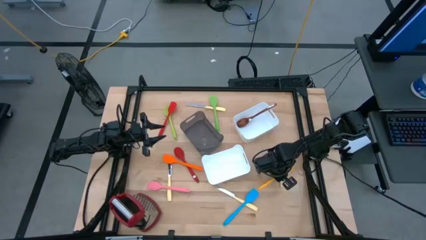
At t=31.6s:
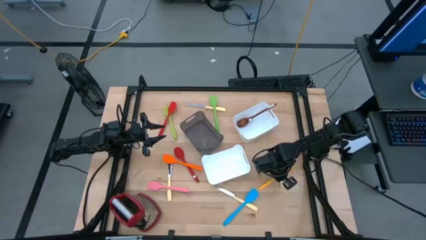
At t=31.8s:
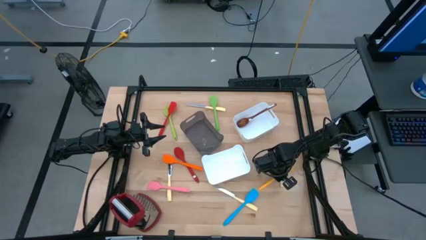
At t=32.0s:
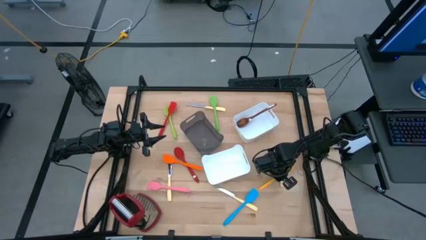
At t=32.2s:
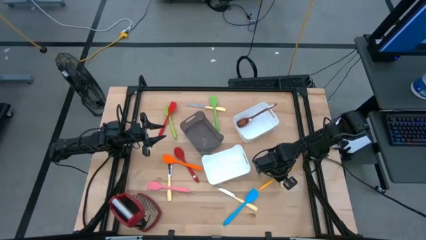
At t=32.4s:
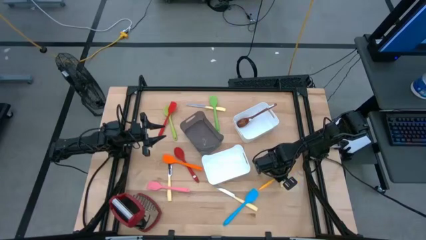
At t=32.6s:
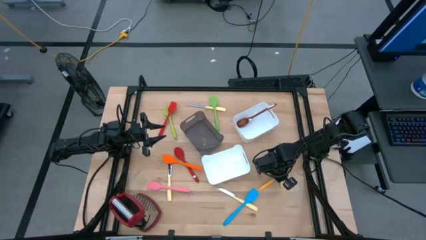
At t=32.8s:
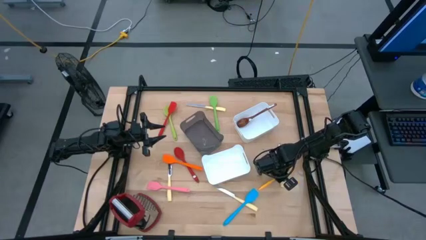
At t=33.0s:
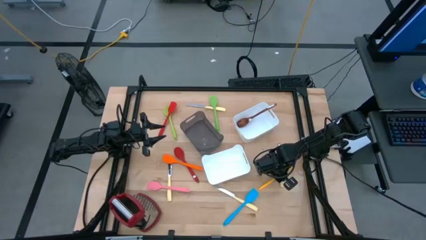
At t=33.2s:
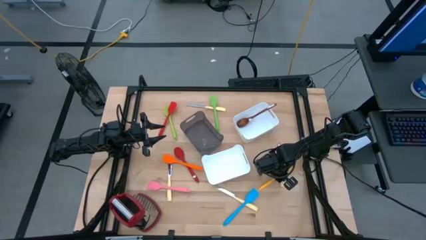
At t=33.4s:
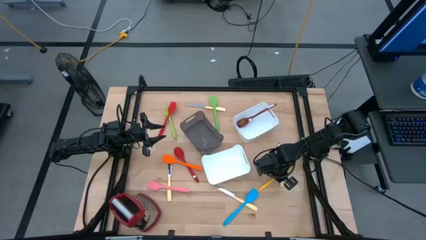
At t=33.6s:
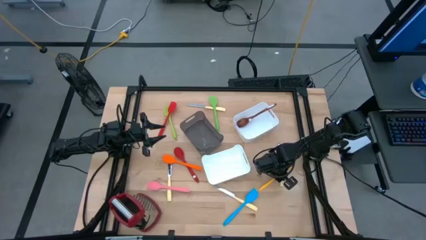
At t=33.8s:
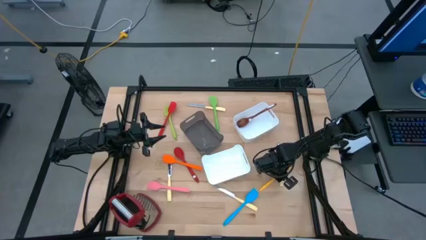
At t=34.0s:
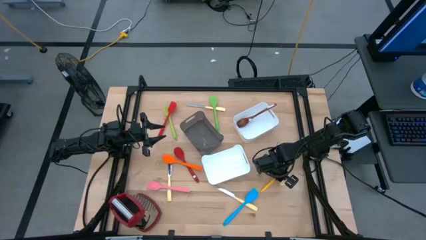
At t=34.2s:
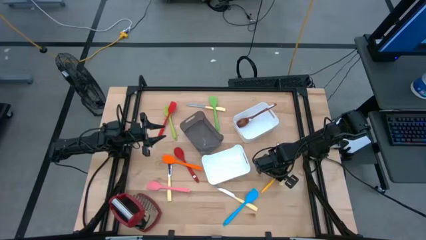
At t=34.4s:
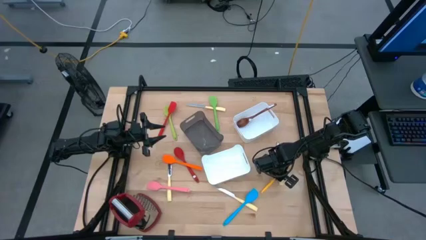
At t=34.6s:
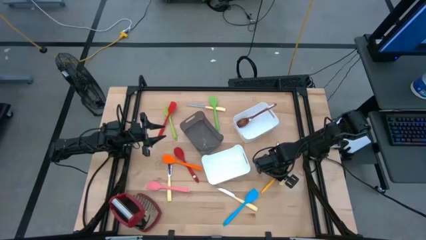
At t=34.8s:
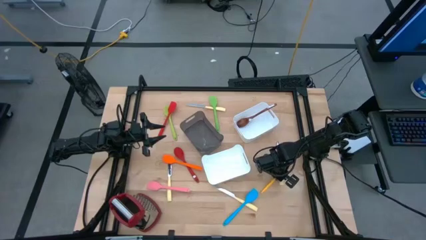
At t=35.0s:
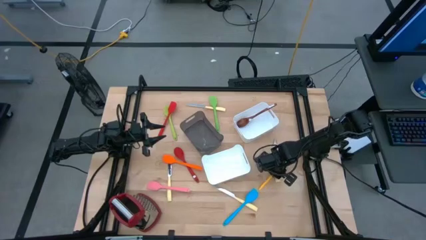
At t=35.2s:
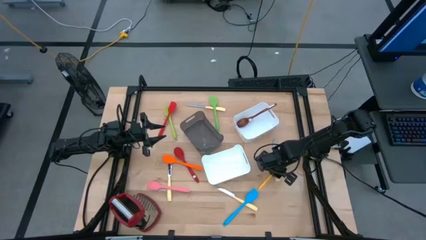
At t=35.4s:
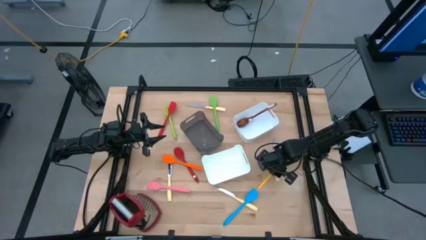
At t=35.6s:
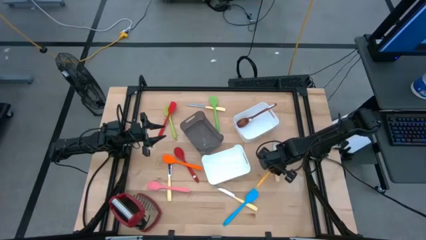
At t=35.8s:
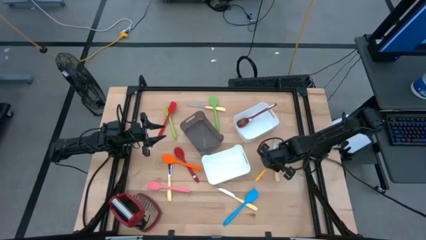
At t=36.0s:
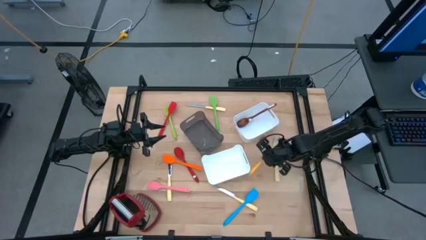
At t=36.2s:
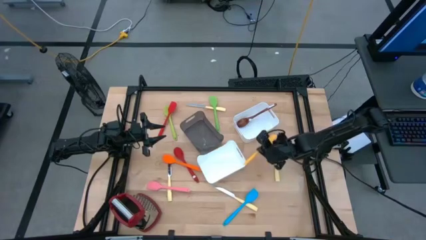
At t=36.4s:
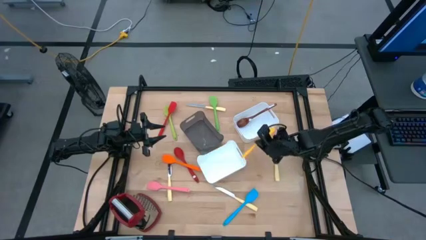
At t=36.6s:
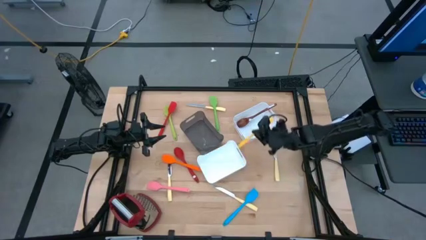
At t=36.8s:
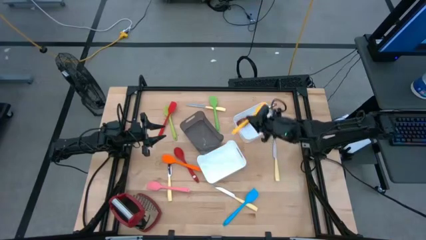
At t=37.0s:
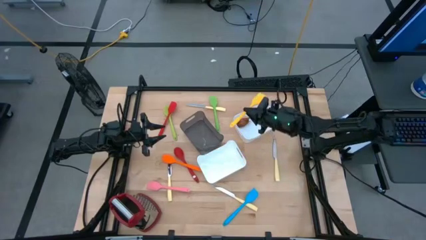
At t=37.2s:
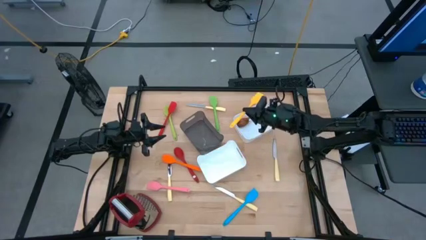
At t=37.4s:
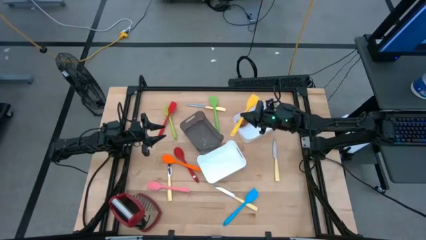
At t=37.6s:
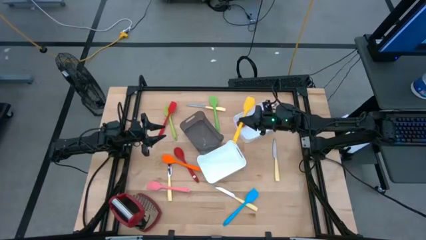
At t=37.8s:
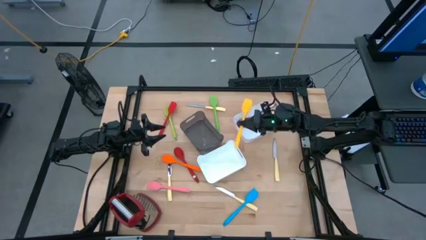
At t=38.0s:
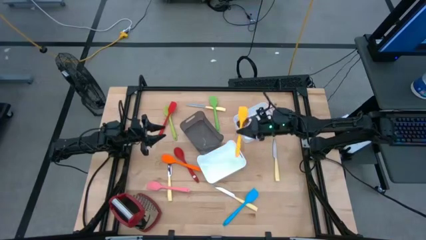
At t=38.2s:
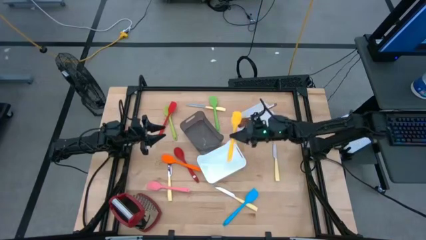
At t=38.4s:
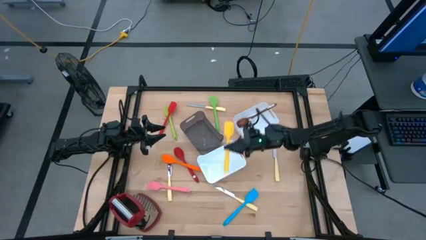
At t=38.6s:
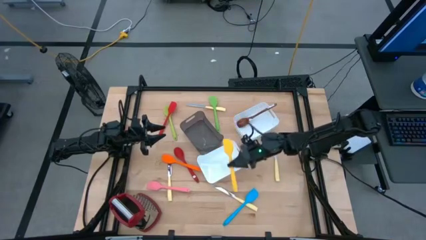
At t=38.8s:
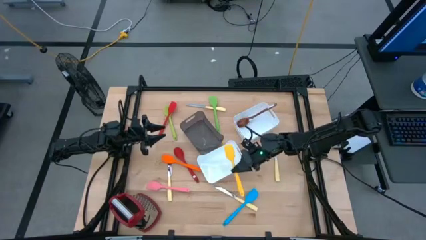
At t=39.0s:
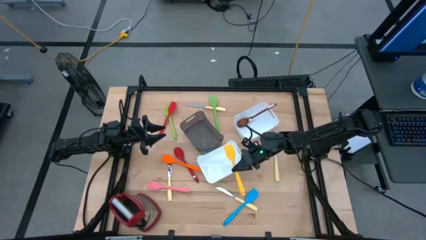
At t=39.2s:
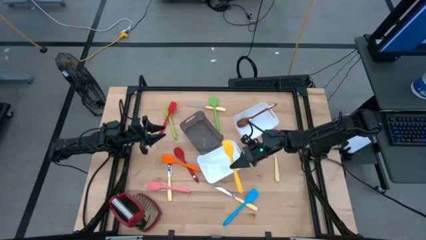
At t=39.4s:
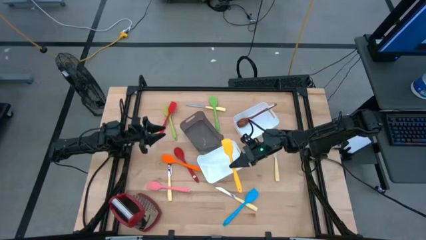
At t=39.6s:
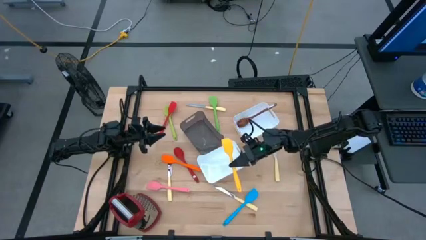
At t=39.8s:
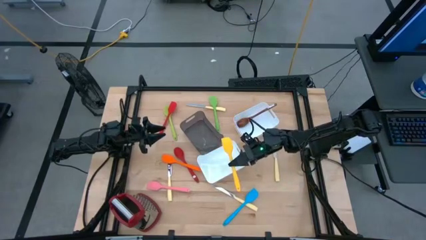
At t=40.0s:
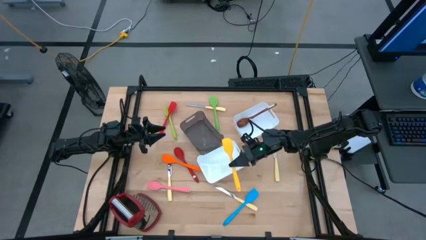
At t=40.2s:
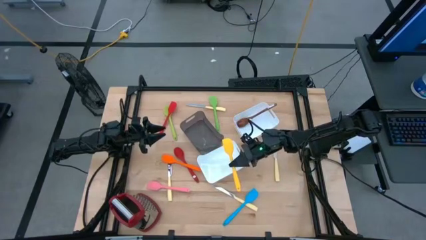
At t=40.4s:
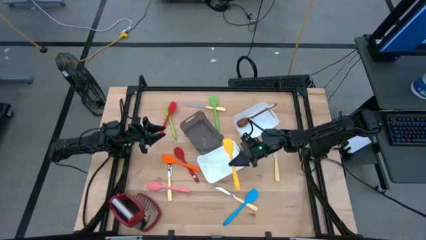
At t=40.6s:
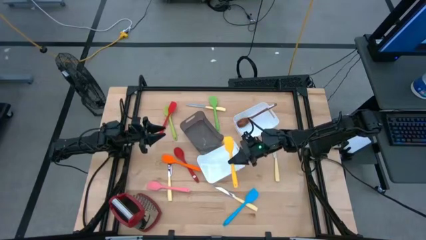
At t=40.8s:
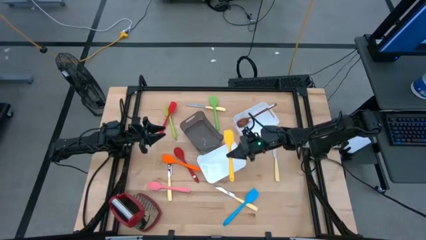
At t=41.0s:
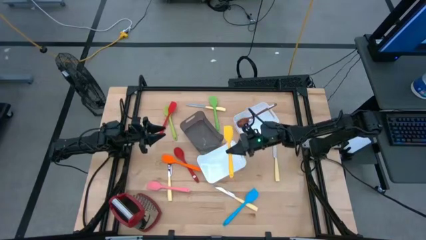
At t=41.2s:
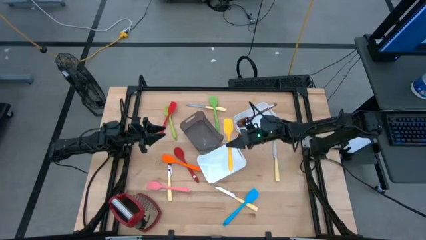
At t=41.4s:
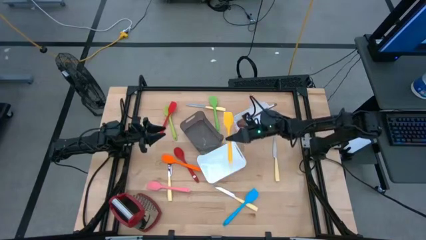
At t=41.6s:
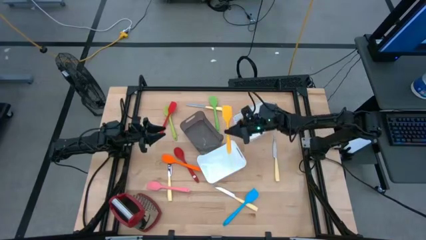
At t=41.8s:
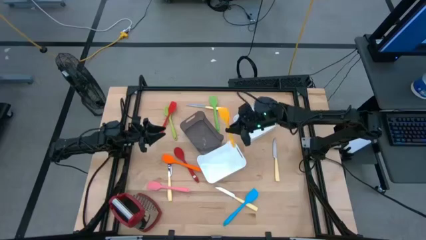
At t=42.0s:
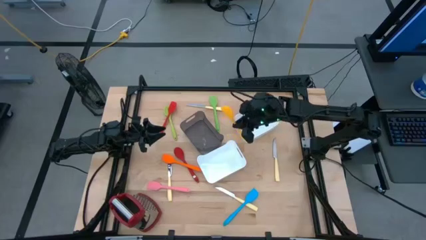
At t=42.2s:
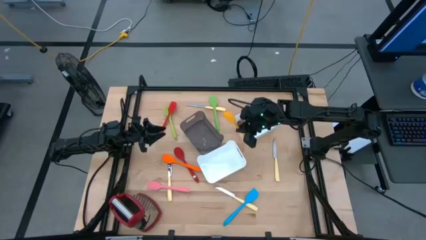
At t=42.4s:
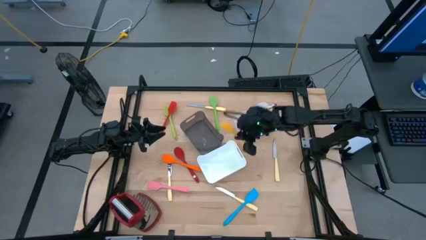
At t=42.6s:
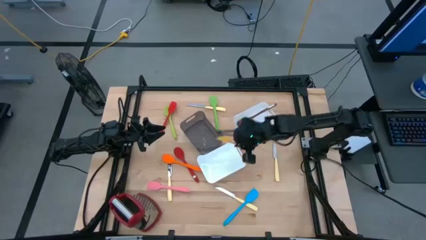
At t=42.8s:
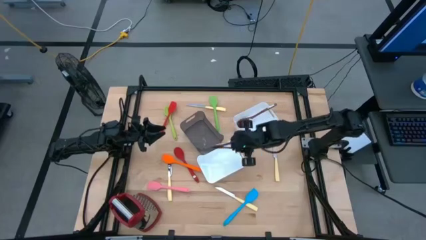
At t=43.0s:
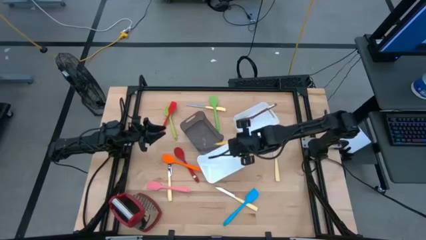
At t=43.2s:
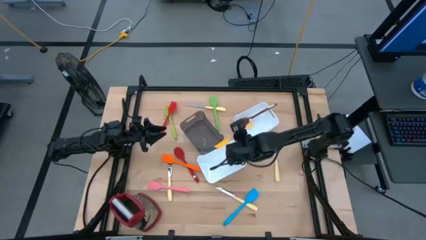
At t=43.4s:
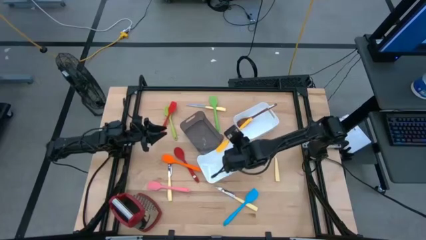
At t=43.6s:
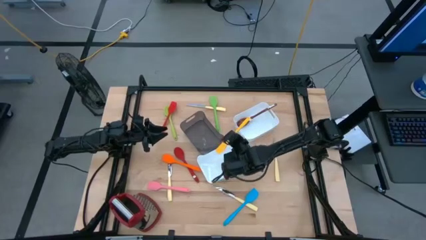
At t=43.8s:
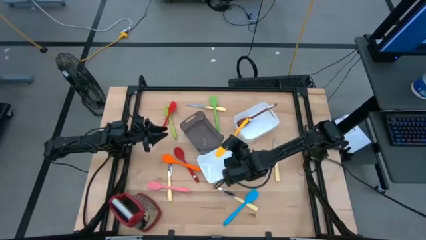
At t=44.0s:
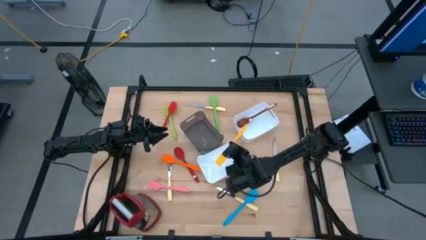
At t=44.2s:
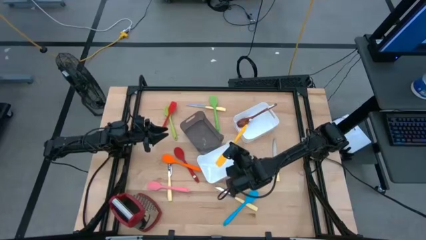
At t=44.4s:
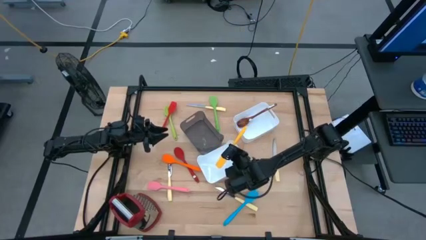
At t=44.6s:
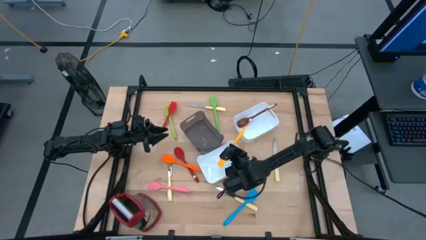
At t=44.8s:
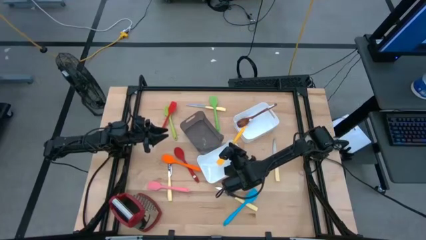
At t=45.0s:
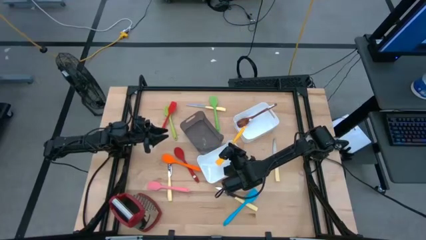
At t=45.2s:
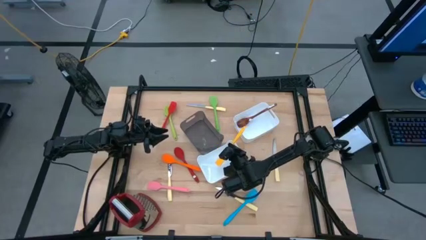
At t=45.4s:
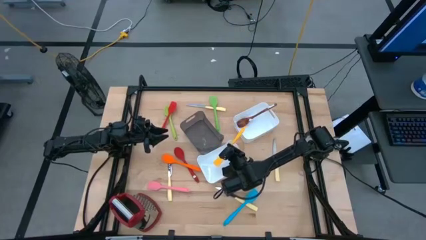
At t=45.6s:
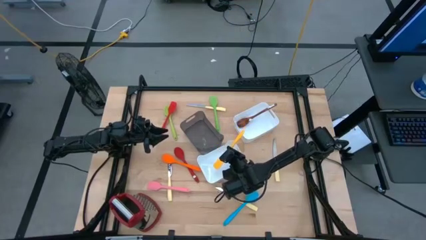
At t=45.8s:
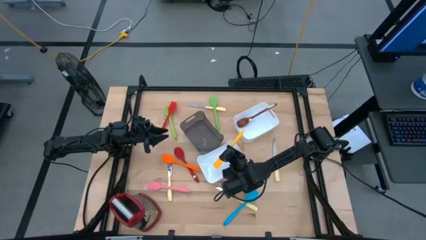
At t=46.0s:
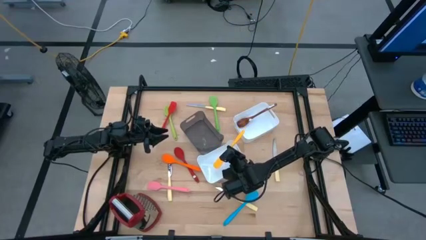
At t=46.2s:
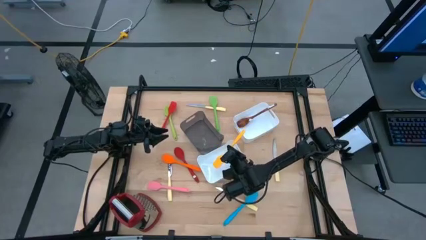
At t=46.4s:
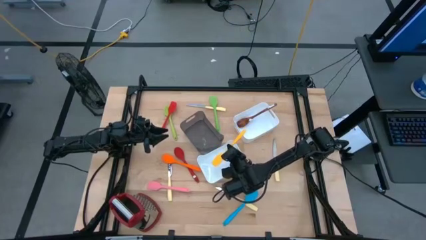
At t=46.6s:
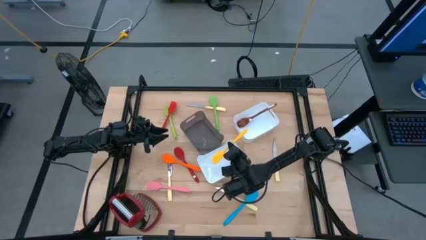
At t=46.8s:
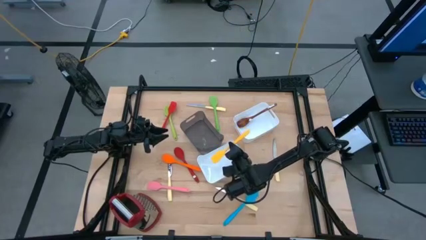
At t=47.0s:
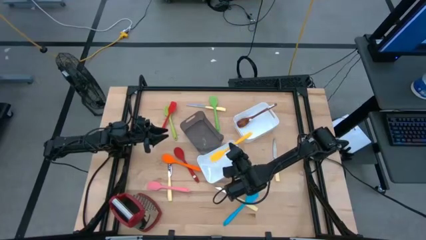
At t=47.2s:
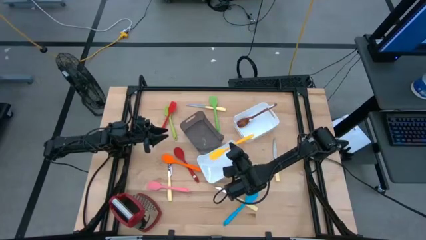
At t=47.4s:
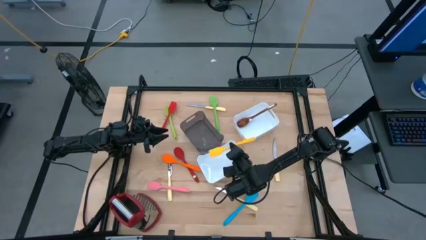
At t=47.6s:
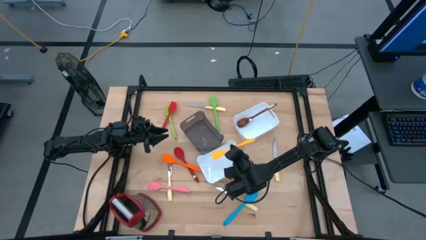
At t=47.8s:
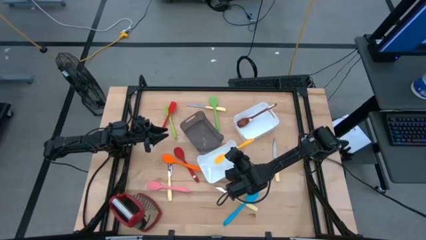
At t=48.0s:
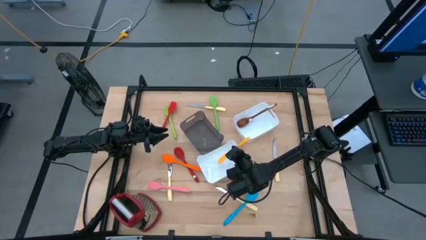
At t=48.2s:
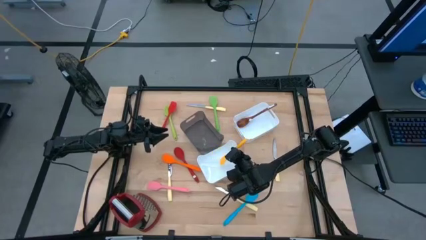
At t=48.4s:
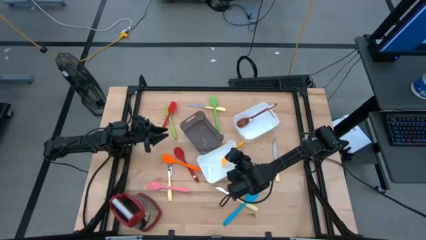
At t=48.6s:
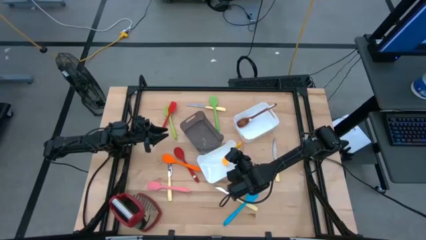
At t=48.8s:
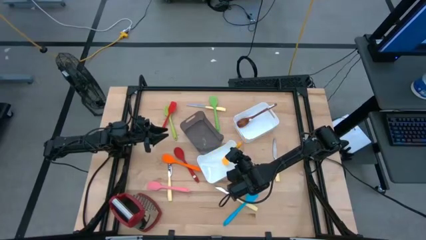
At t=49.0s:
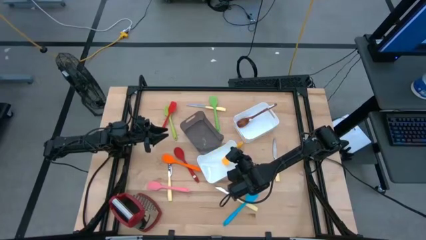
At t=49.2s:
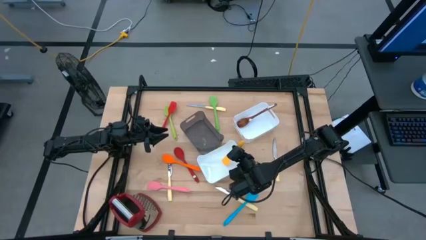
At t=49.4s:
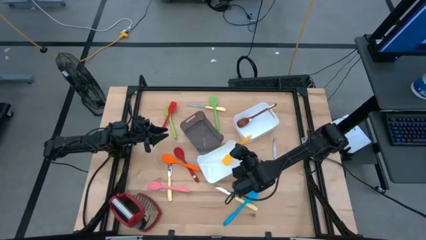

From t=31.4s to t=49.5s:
Task: Pick & Place Kitchen Items
Put the yellow spatula into the bottom white bin
